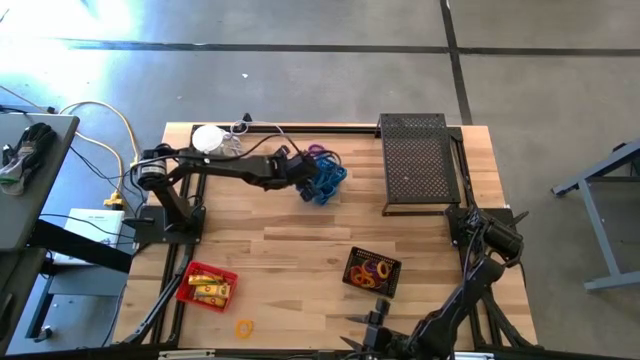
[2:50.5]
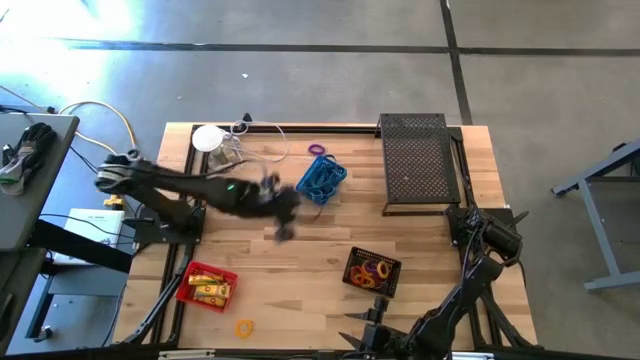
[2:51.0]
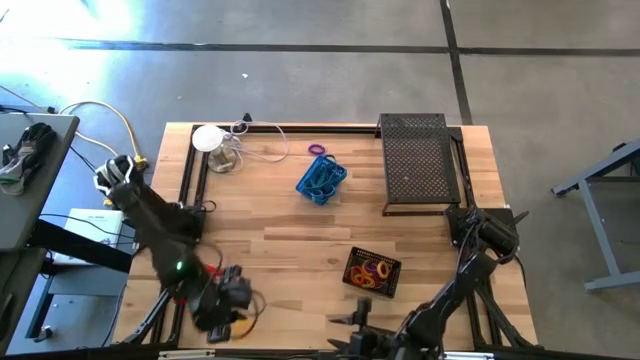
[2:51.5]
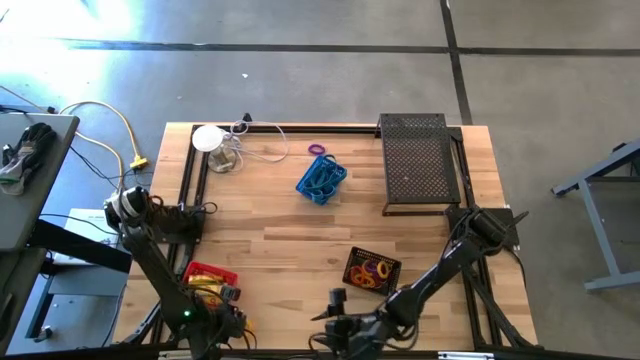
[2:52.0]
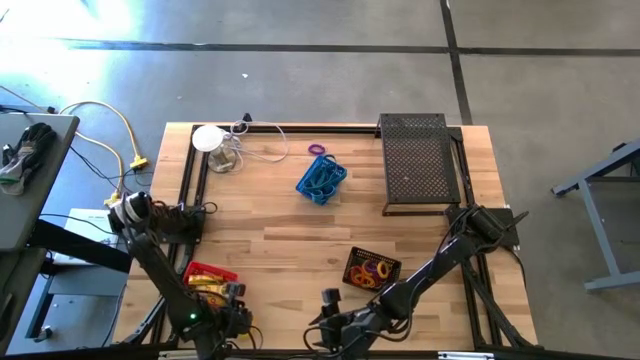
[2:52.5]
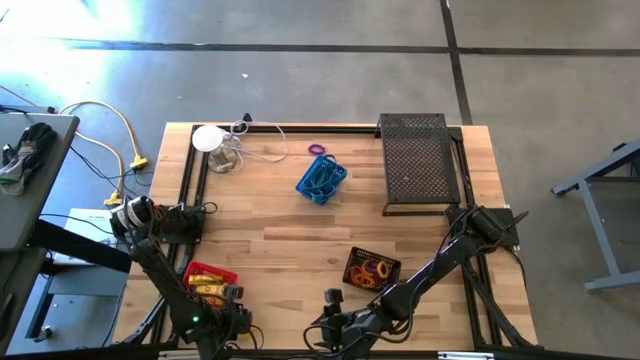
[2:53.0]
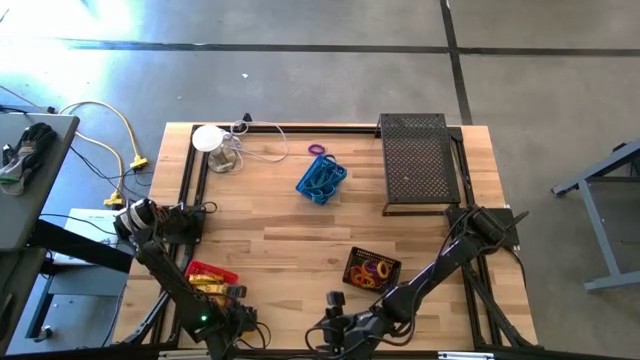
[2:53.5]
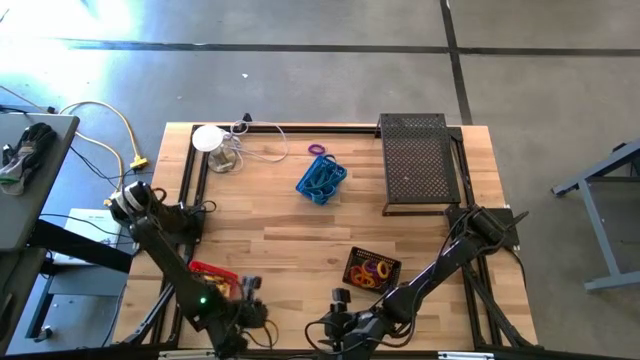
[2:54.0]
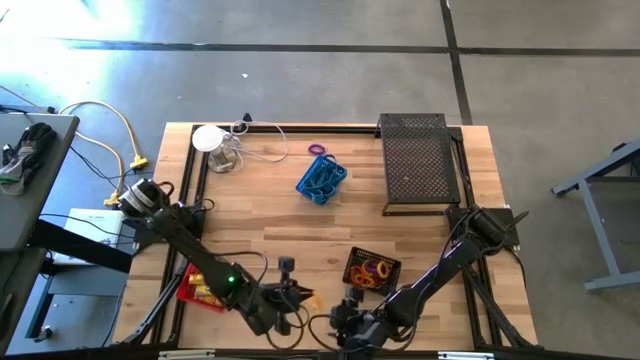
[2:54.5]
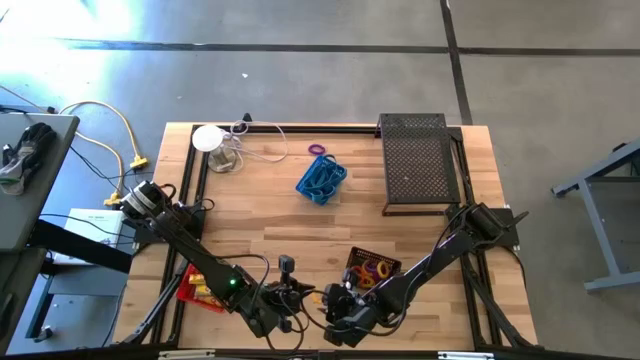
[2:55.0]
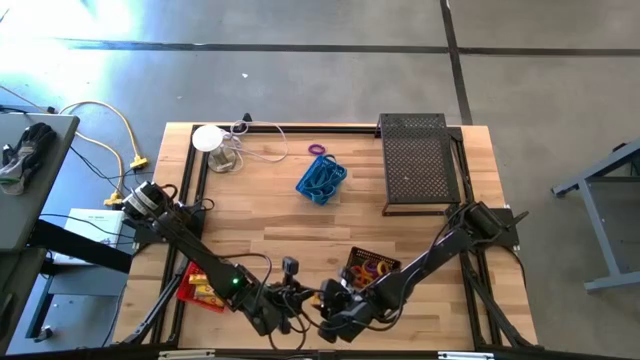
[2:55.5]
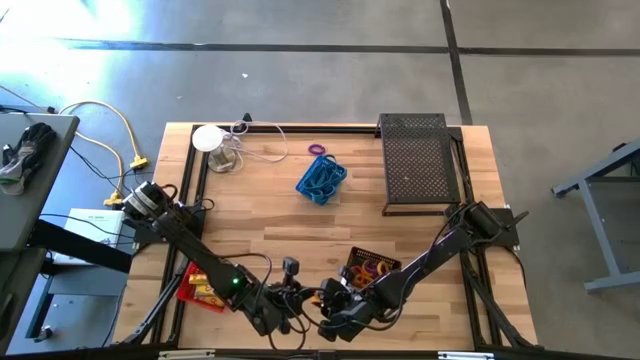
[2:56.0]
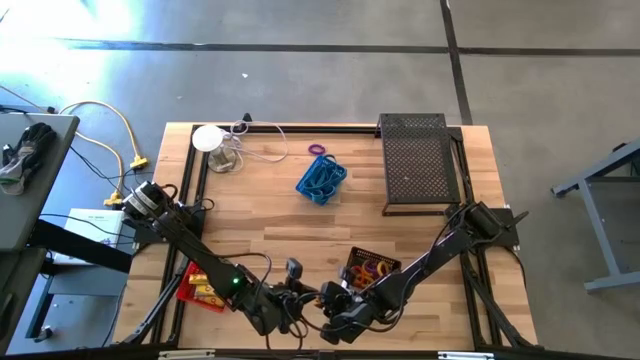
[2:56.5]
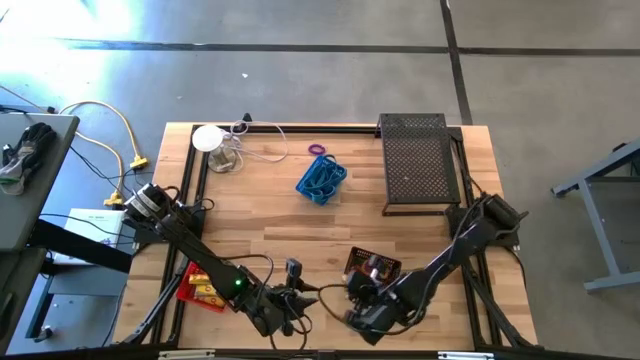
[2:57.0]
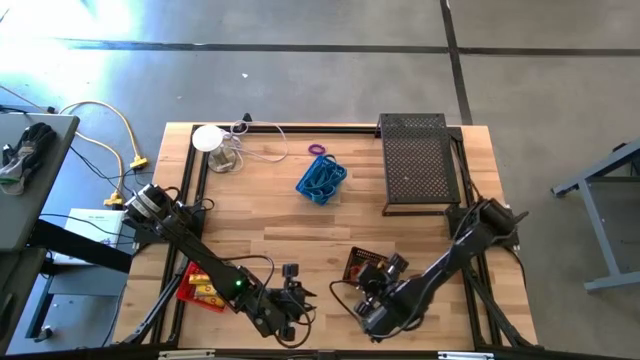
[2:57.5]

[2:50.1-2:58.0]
Task: Pick & Place Office Desk Supplies
Put the yellow wrist coil keychain into the black bin

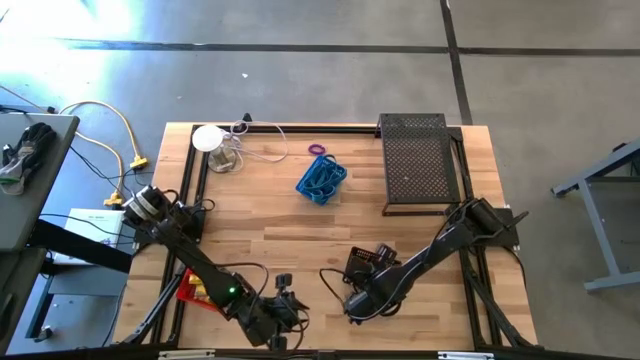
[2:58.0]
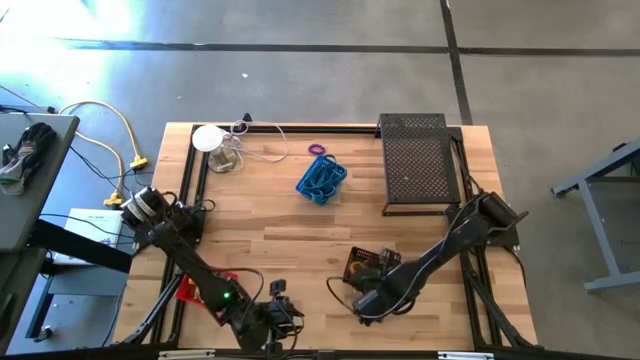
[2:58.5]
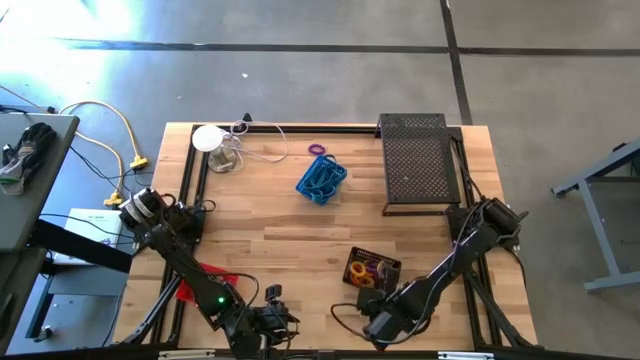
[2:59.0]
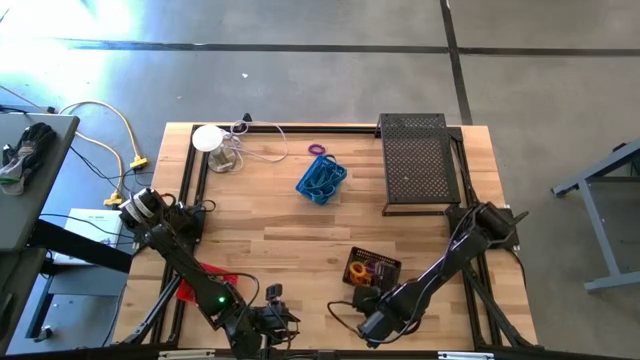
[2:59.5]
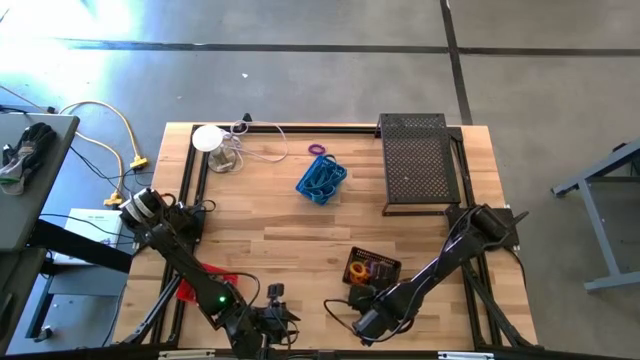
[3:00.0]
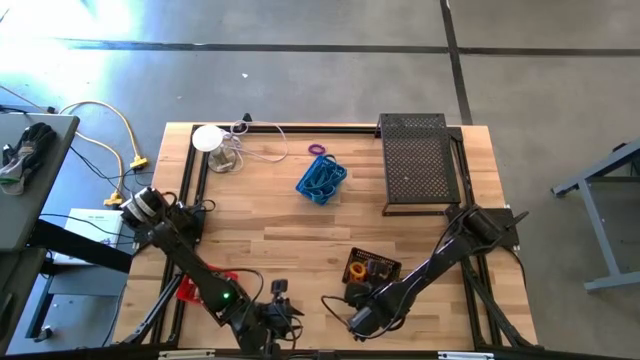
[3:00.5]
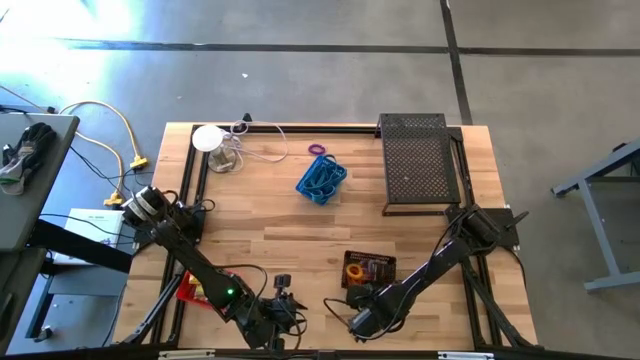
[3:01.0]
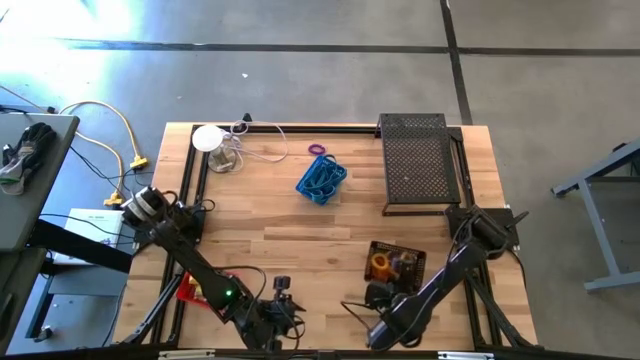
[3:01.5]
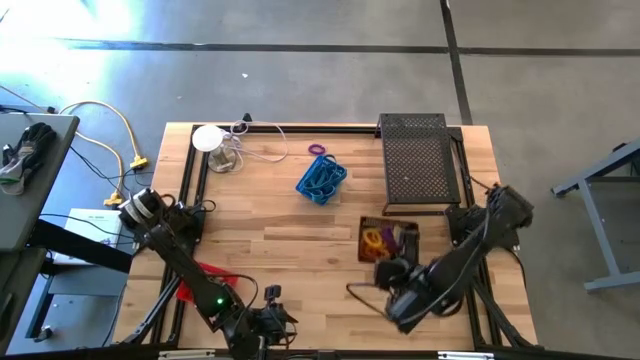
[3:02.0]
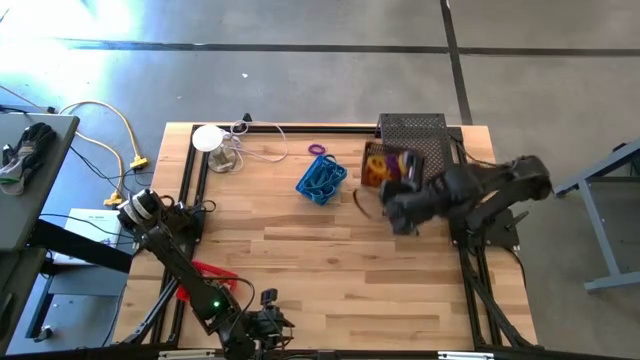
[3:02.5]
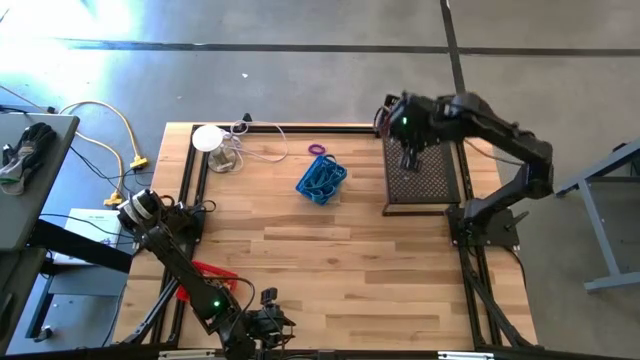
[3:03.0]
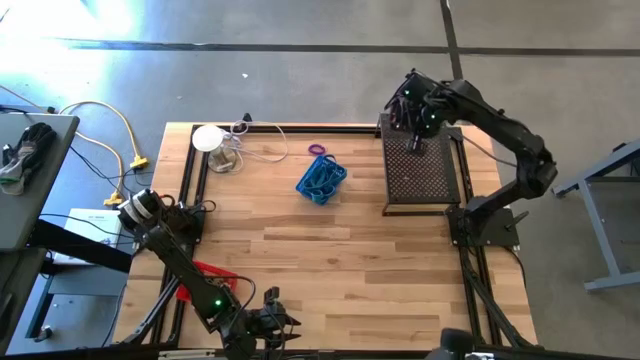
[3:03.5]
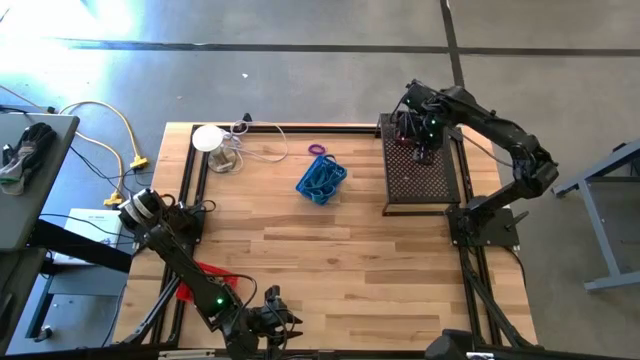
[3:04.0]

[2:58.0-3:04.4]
Put the black bin on the shelf

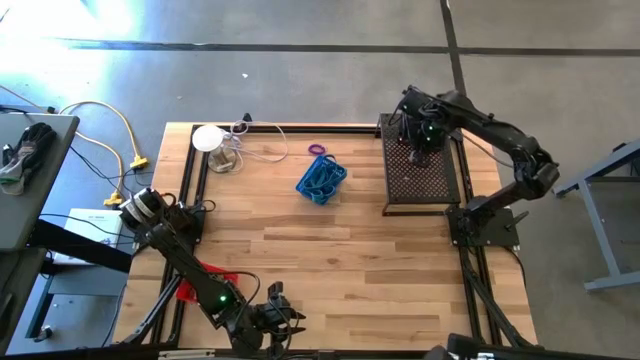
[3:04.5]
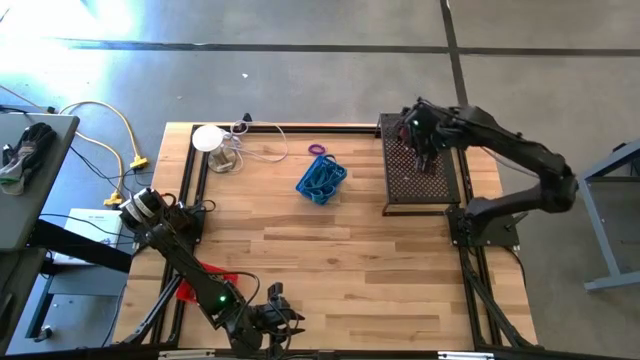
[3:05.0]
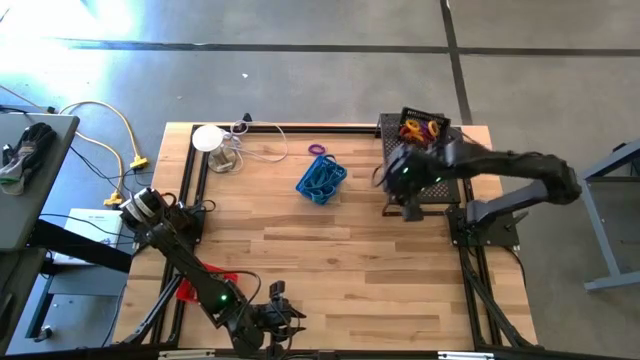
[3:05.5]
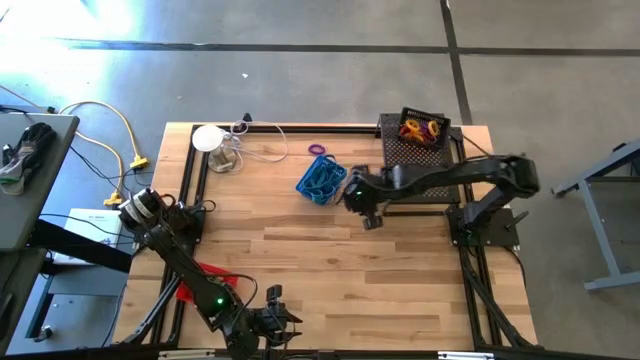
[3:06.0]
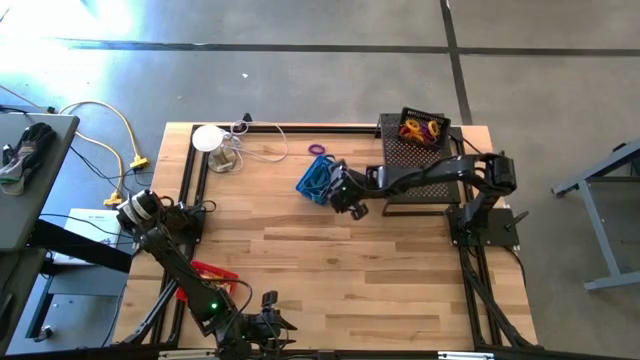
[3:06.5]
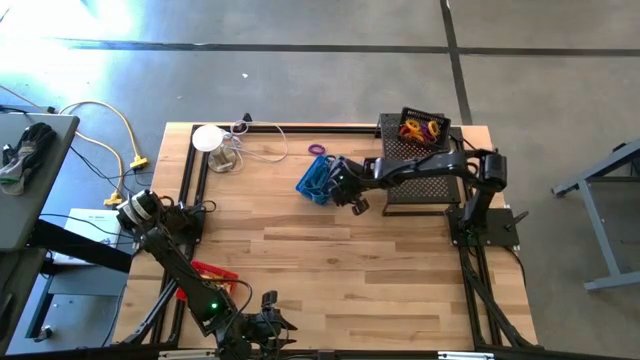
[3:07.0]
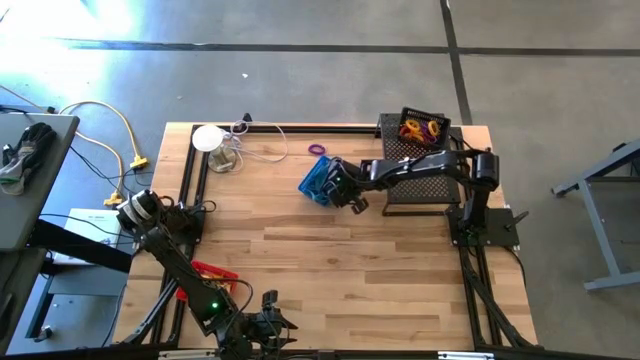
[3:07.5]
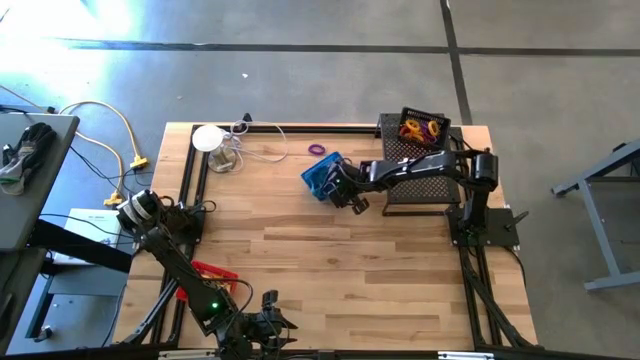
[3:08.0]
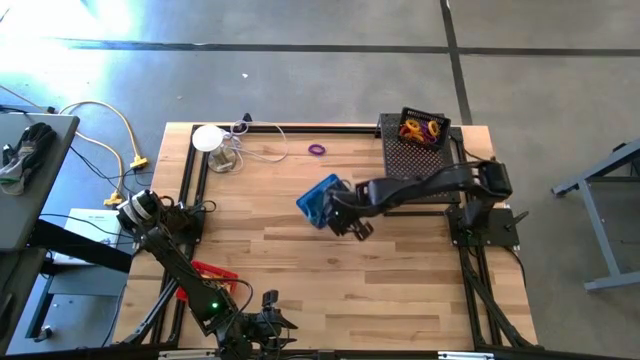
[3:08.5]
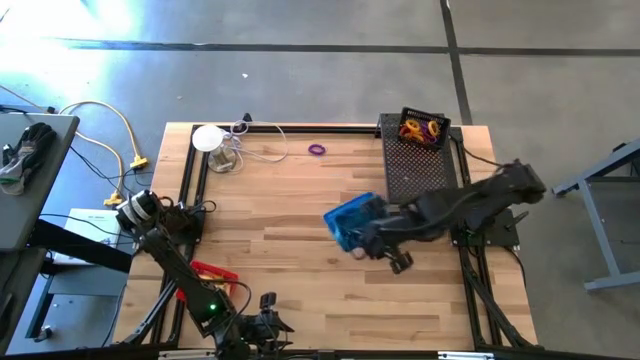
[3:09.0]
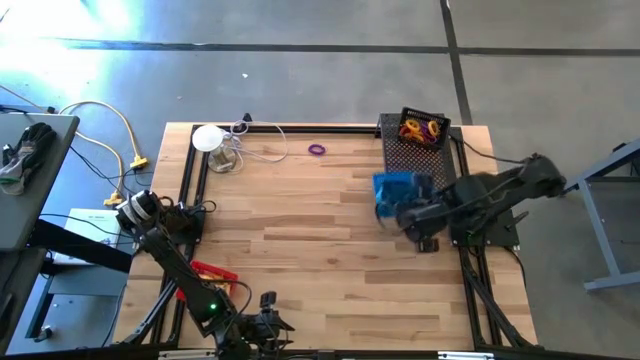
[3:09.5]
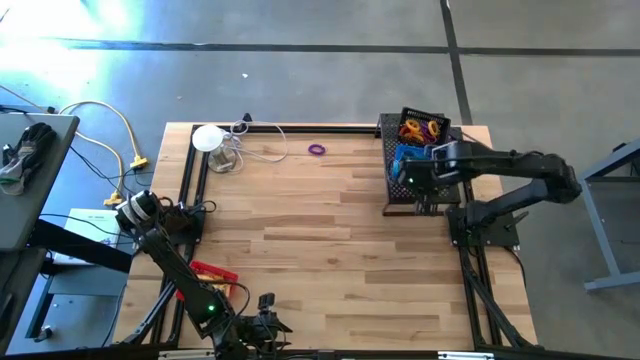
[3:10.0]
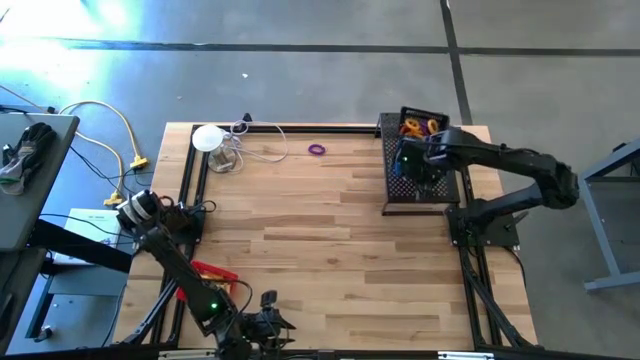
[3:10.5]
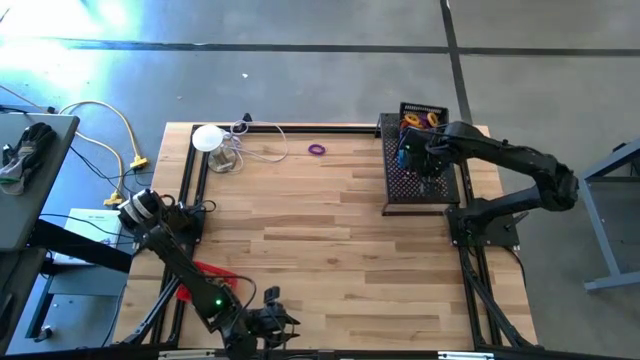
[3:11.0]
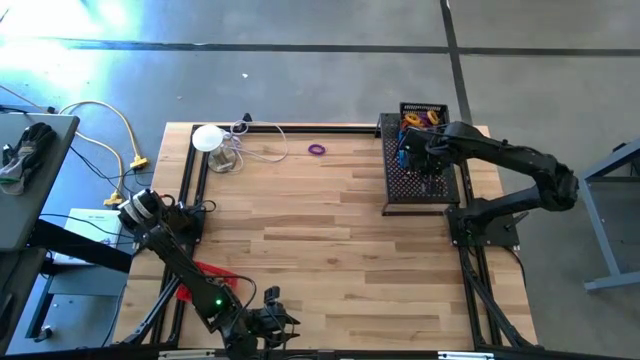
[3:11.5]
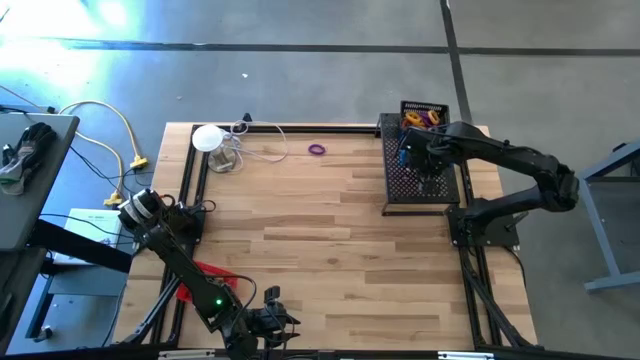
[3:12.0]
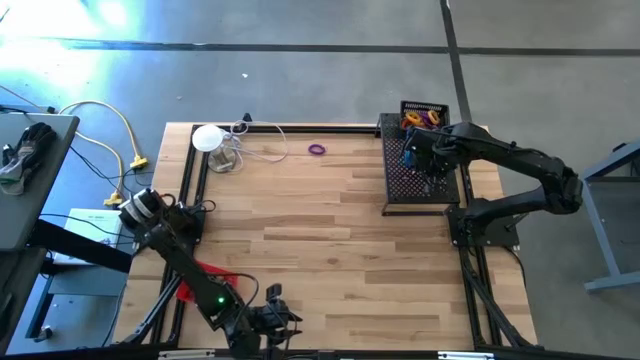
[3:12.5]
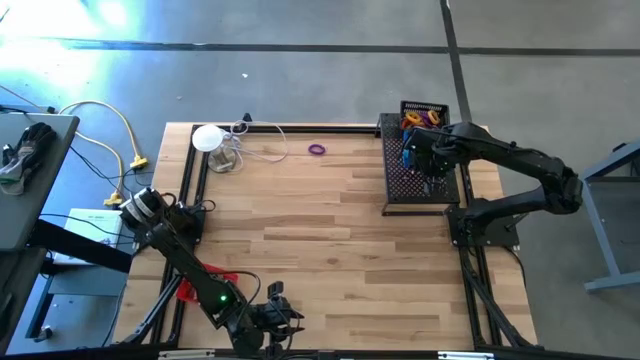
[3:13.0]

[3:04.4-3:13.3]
Put the blue bin on the shelf
